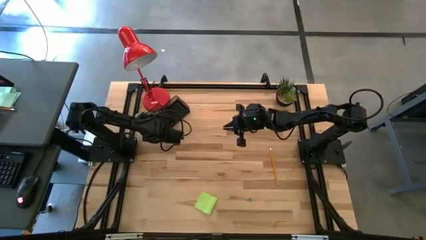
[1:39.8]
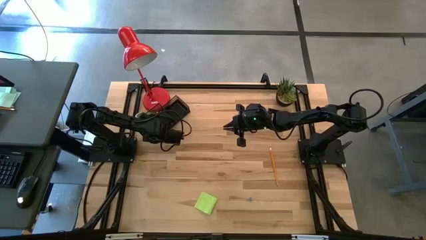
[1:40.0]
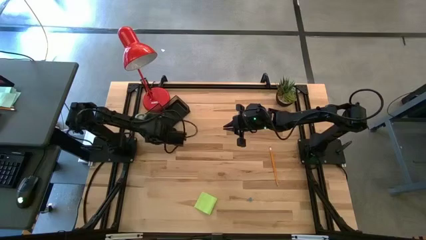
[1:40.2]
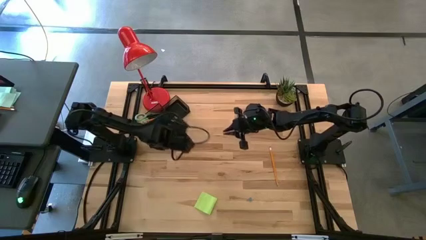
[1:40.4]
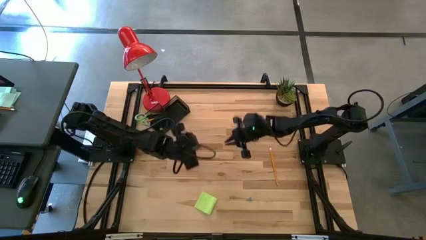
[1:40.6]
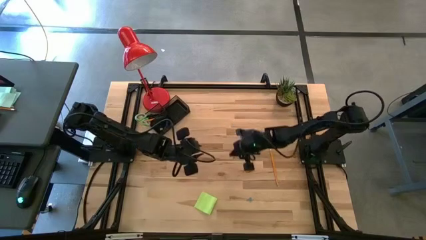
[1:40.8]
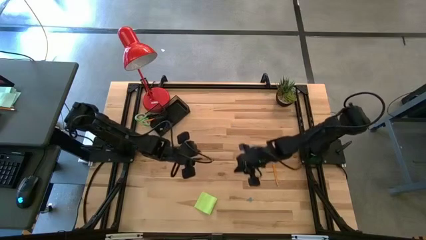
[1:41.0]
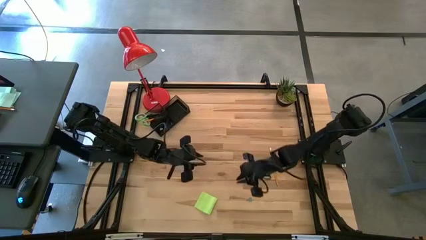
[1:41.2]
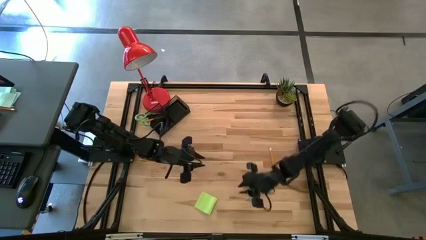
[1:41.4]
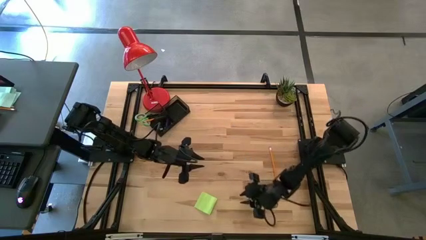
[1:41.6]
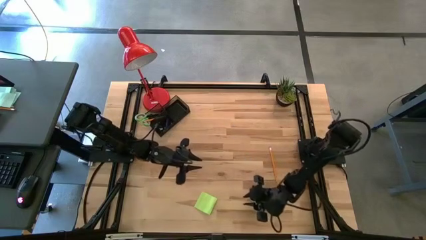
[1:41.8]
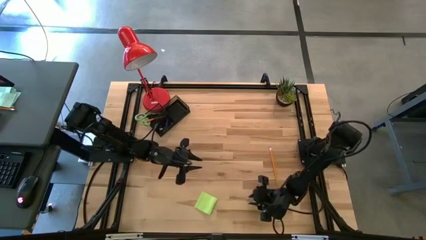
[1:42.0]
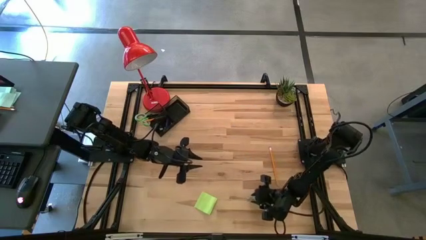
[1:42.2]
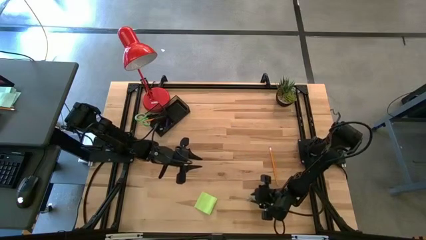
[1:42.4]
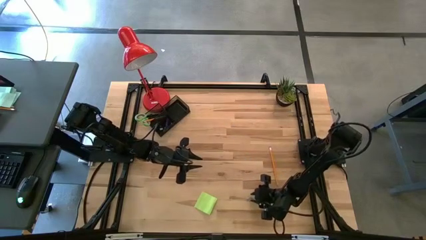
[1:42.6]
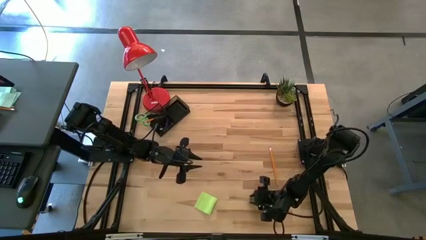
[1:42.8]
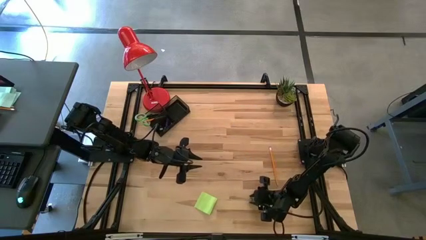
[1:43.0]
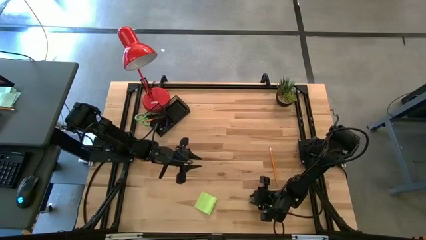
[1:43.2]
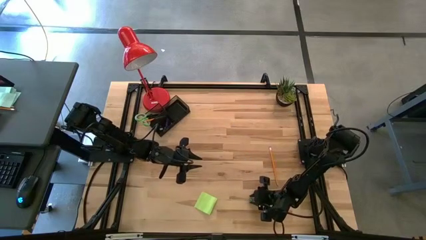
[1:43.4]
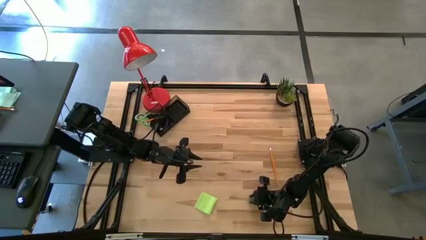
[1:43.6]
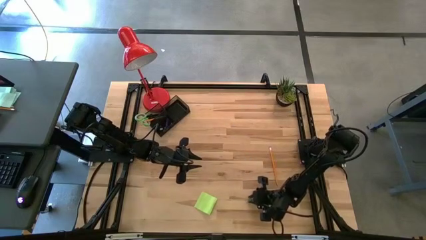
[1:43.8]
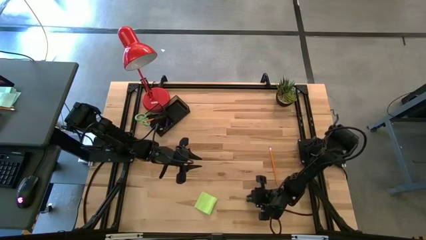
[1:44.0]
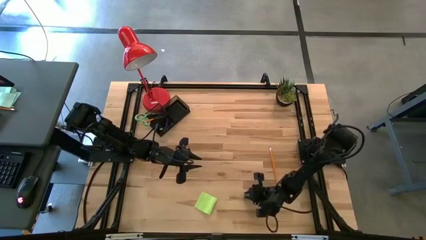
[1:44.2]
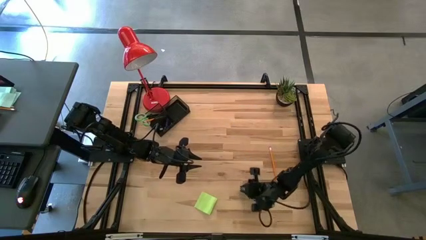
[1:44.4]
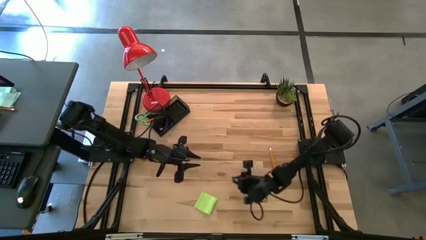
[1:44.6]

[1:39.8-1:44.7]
Task: Pick and place office supplies into organizer
Put the blue binder clip into the desk organizer

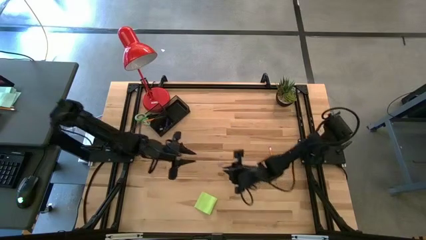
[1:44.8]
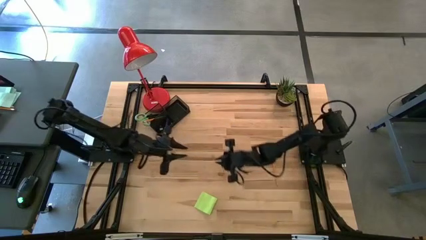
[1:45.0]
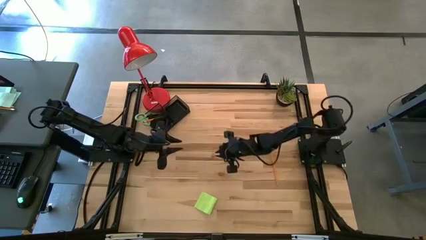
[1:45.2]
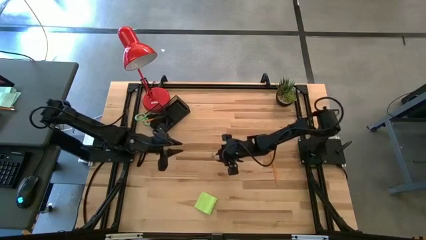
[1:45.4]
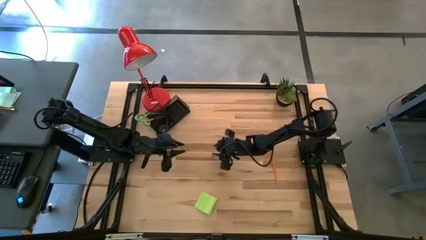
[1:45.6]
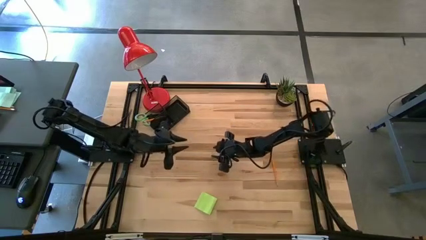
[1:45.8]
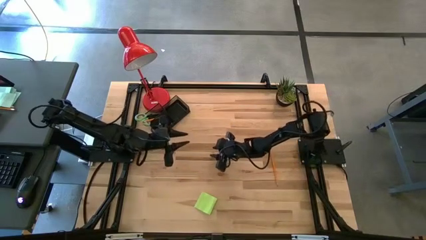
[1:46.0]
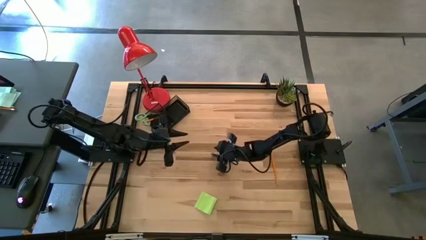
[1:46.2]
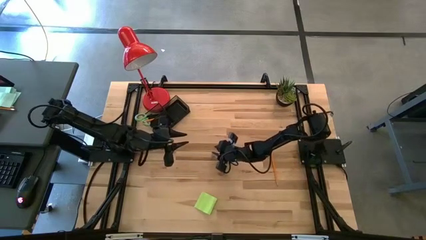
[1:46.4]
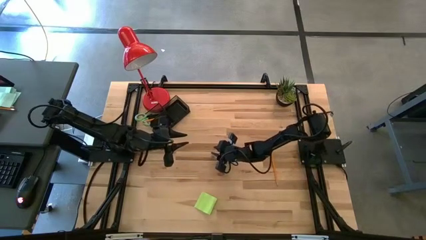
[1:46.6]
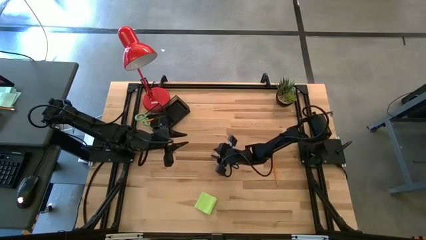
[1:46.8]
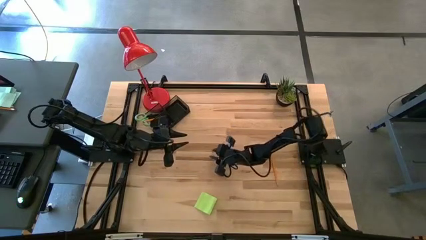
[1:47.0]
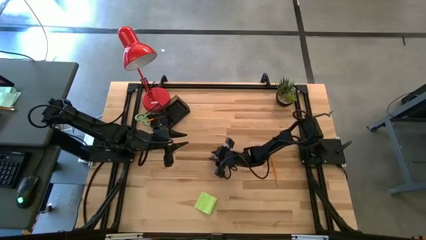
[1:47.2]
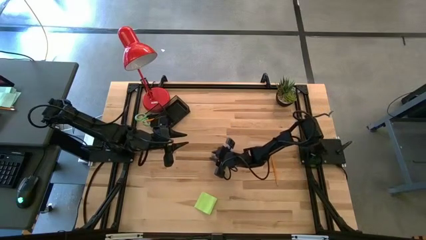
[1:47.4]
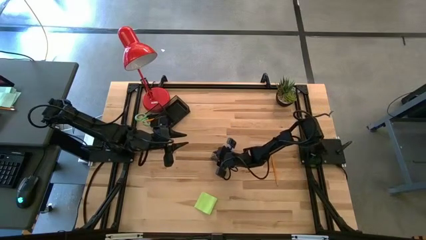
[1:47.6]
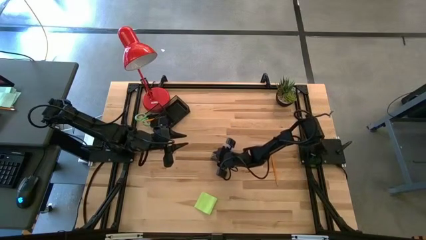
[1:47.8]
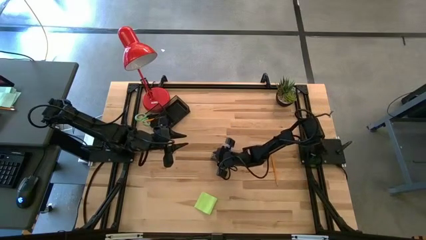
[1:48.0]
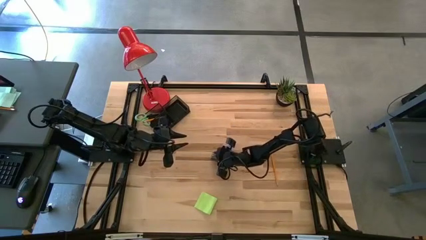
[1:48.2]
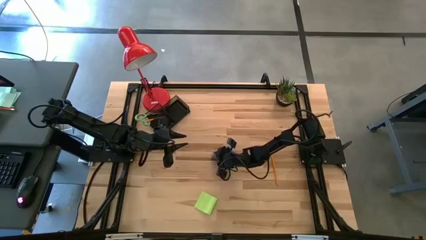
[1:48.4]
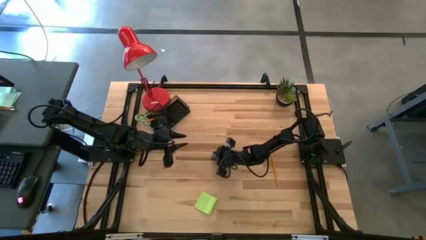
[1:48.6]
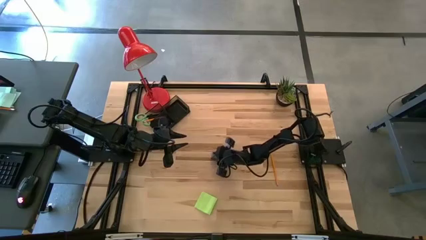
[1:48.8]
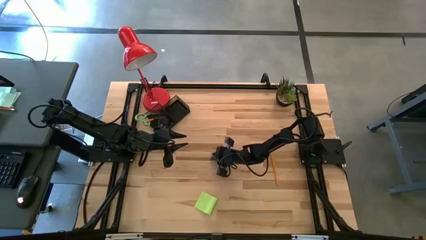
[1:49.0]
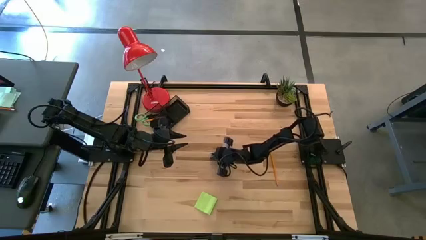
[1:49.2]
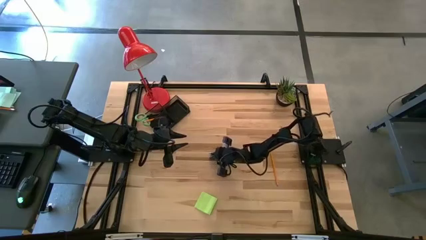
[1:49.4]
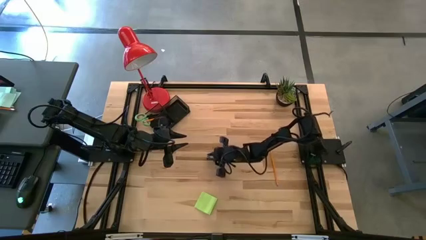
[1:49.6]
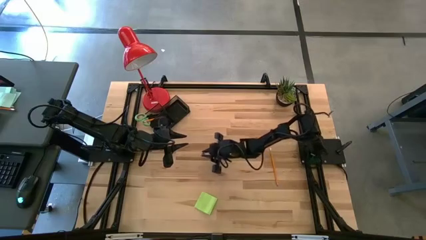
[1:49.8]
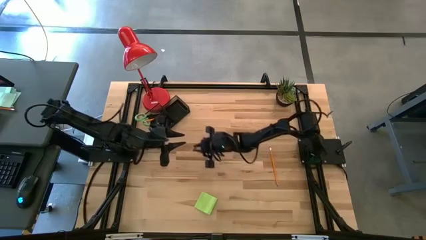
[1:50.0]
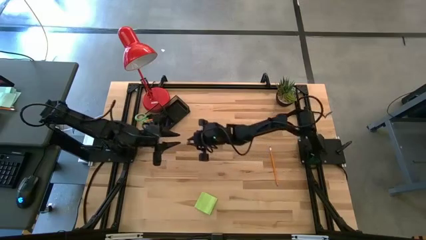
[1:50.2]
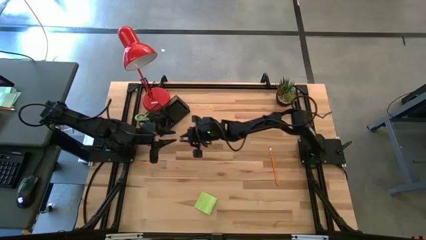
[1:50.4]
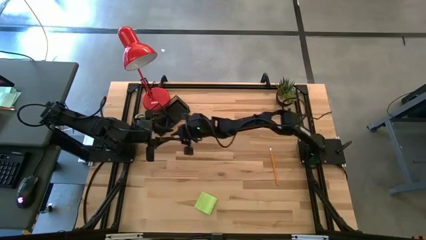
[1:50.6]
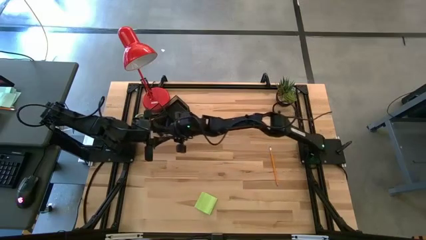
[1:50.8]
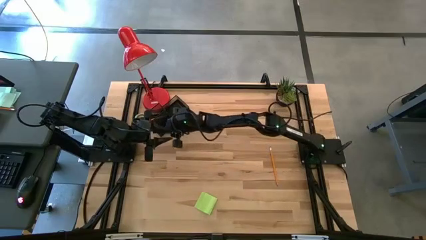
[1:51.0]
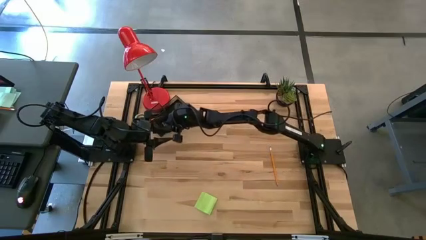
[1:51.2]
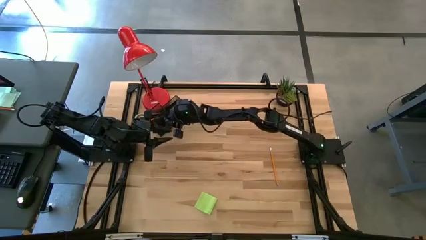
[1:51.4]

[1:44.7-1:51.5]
Put the blue binder clip into the desk organizer

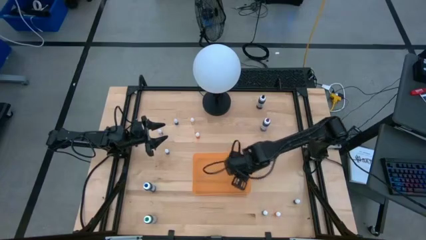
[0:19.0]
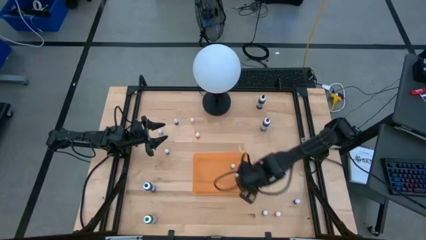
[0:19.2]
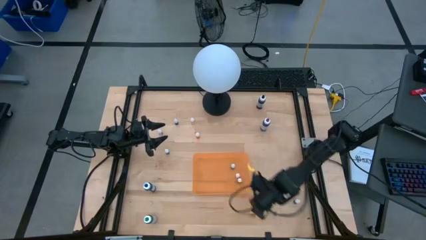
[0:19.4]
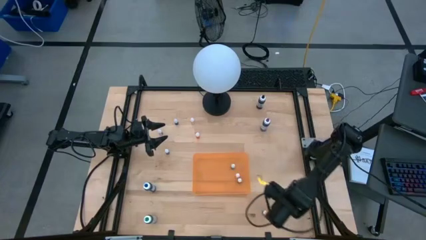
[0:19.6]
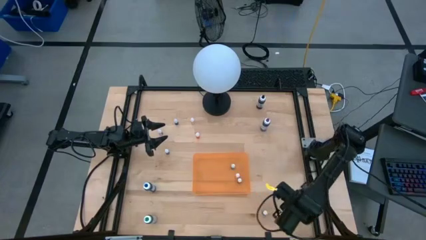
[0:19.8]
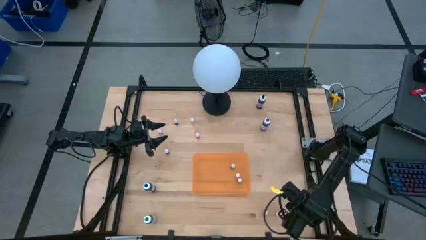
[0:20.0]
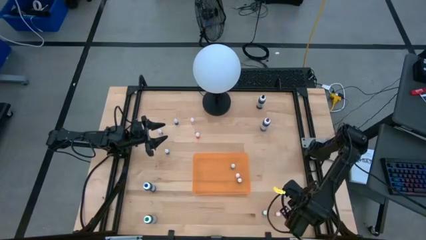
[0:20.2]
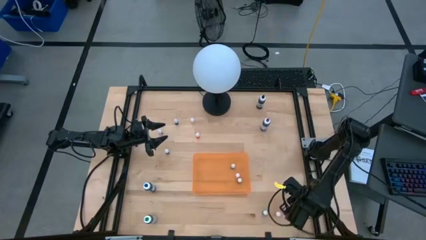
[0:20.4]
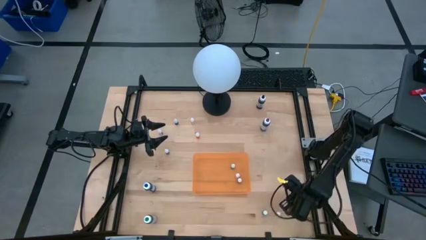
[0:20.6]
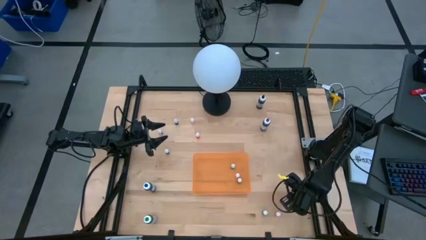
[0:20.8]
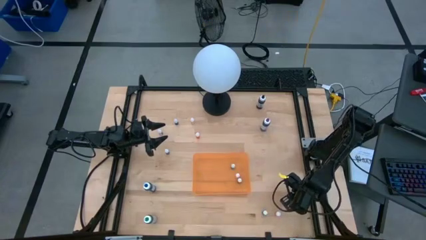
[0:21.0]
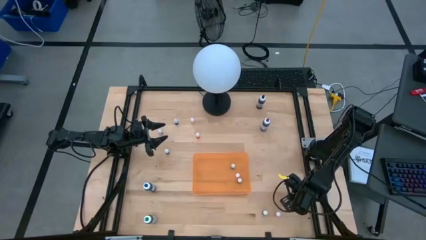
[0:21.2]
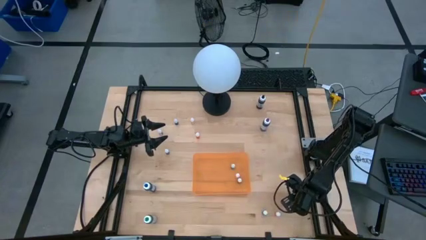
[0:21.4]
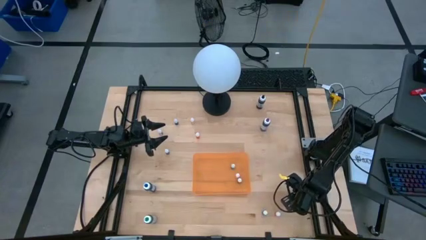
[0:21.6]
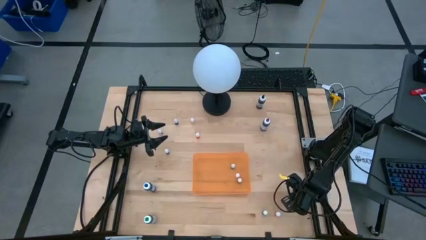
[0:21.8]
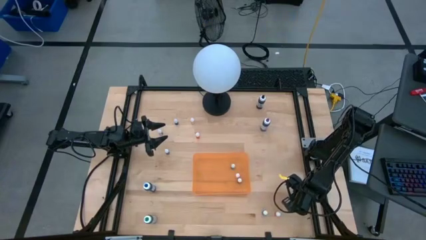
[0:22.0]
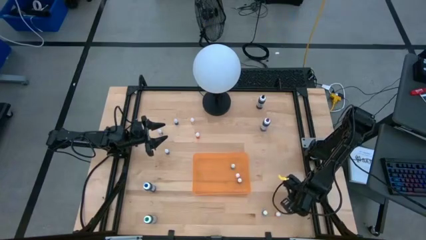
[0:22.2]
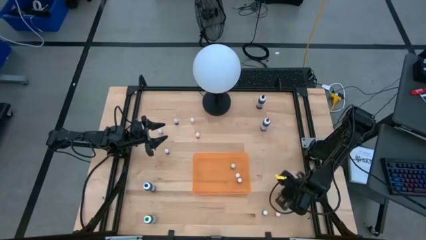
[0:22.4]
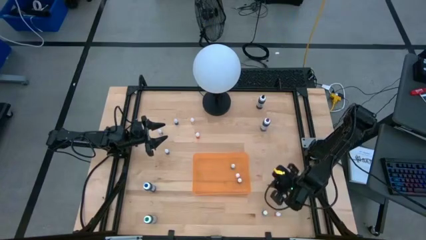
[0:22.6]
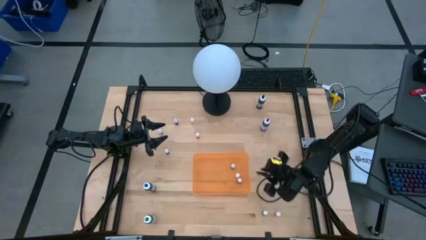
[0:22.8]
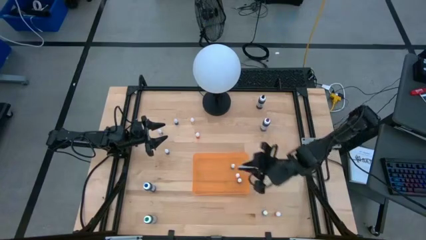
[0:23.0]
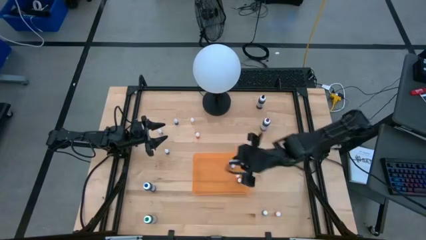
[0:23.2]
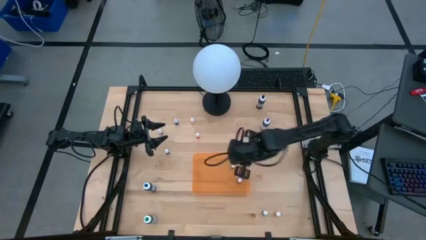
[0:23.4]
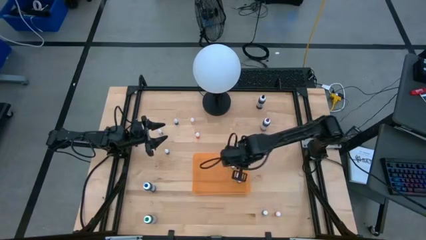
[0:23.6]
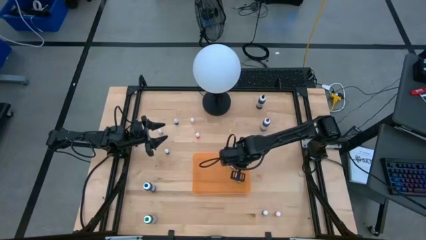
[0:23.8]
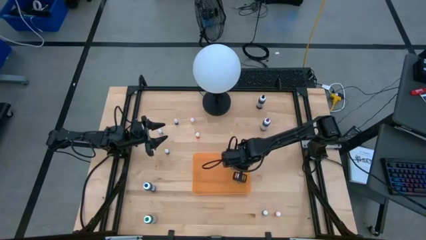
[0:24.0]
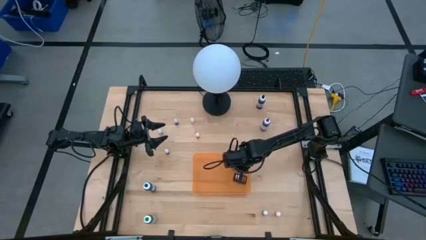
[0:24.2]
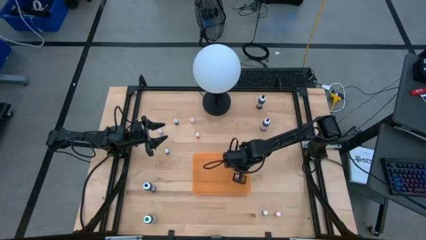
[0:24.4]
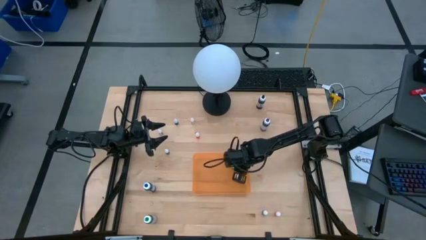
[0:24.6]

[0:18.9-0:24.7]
Task: Pick & Place food coloring
Put the small black food coloring bottle into the orange container
